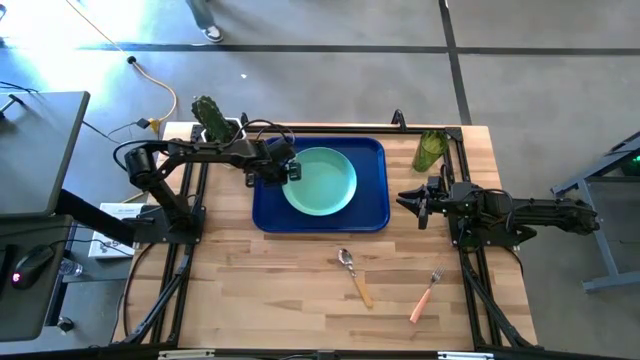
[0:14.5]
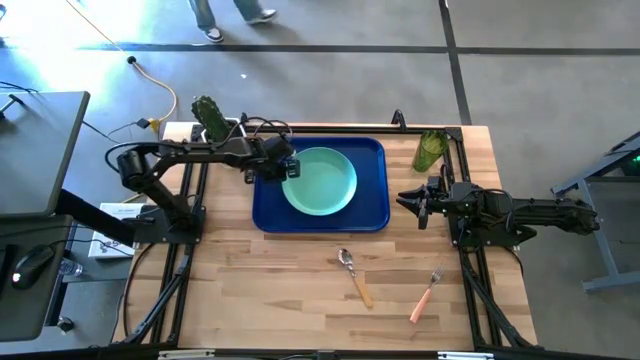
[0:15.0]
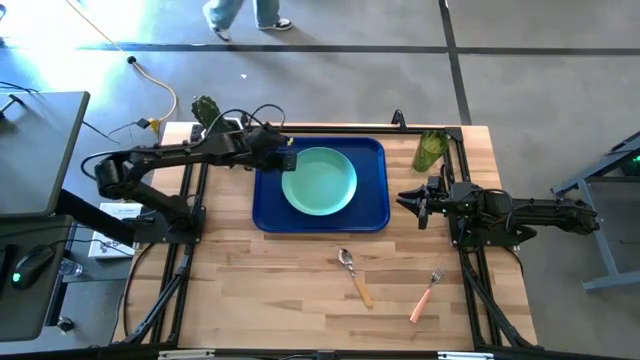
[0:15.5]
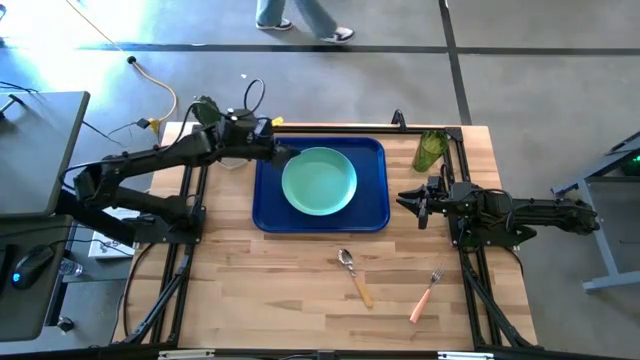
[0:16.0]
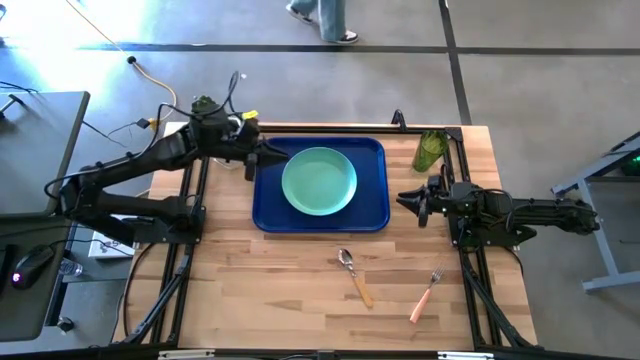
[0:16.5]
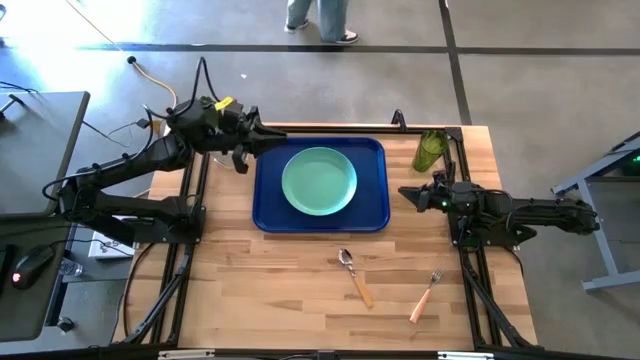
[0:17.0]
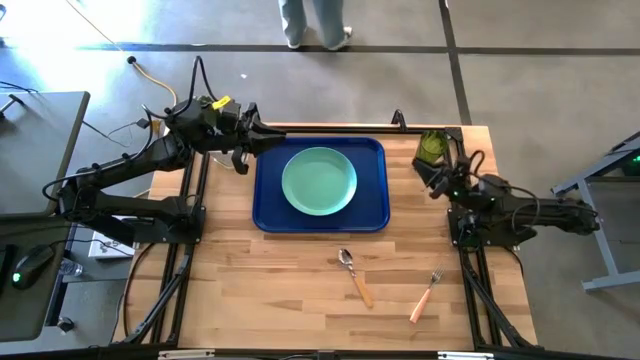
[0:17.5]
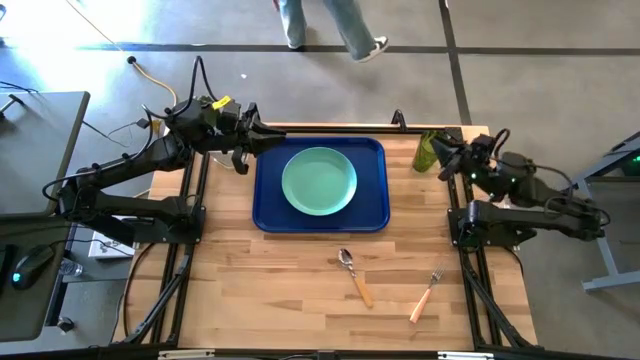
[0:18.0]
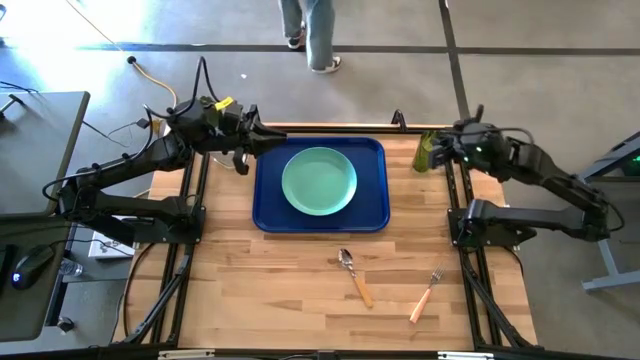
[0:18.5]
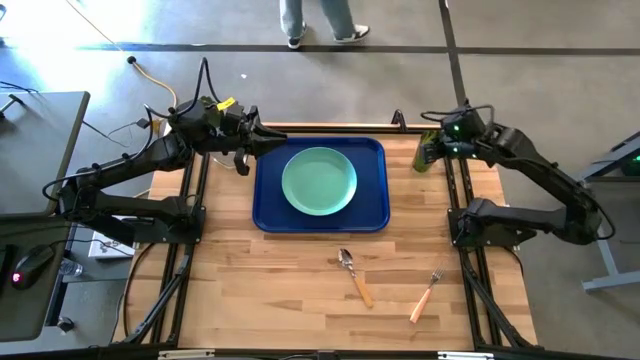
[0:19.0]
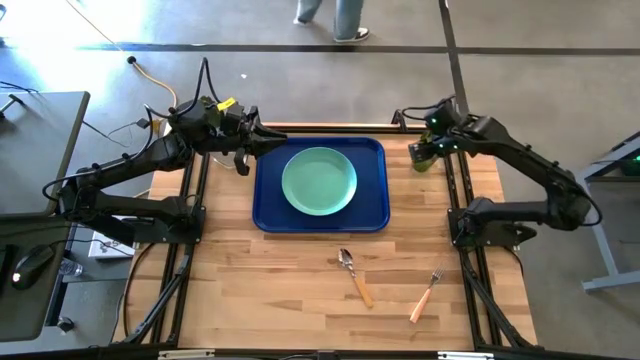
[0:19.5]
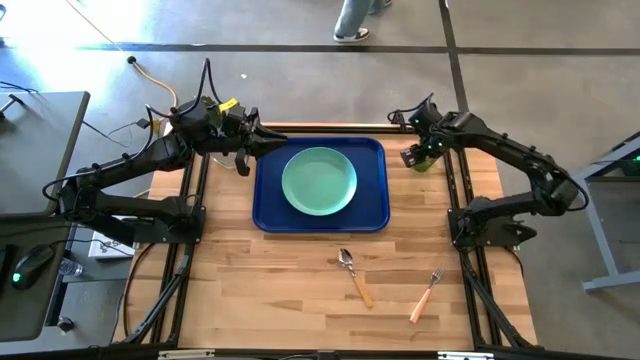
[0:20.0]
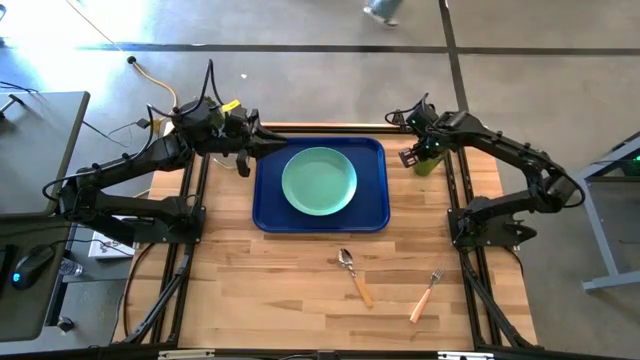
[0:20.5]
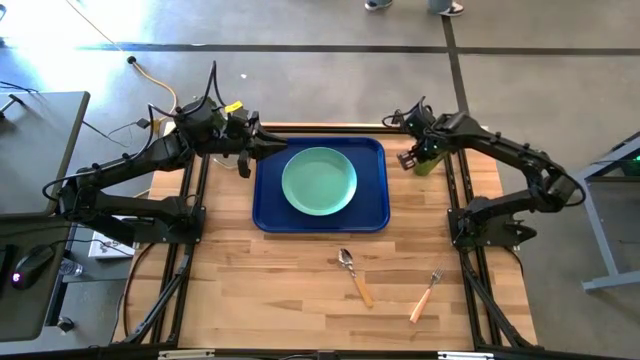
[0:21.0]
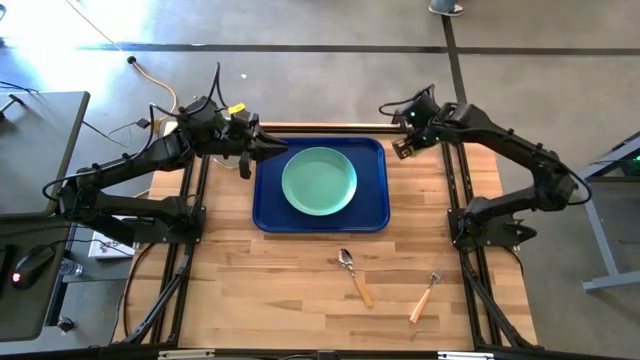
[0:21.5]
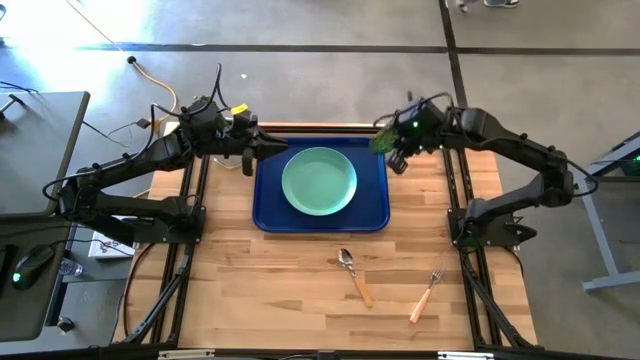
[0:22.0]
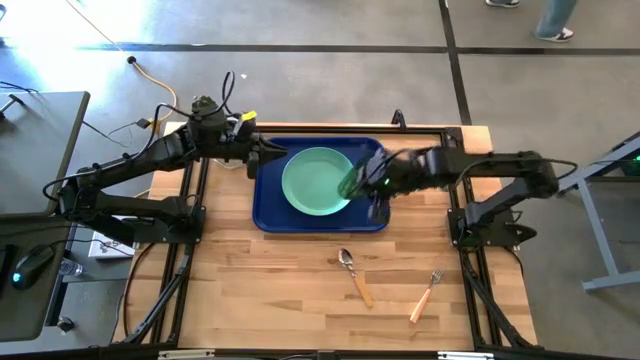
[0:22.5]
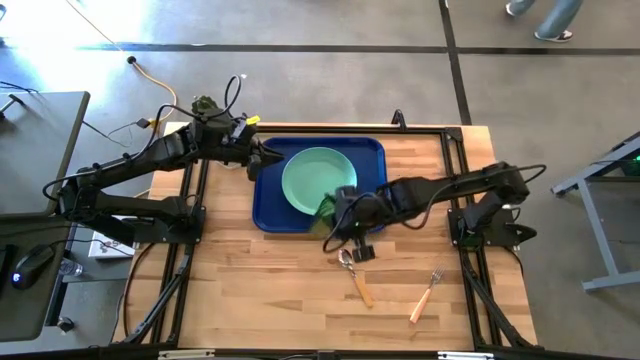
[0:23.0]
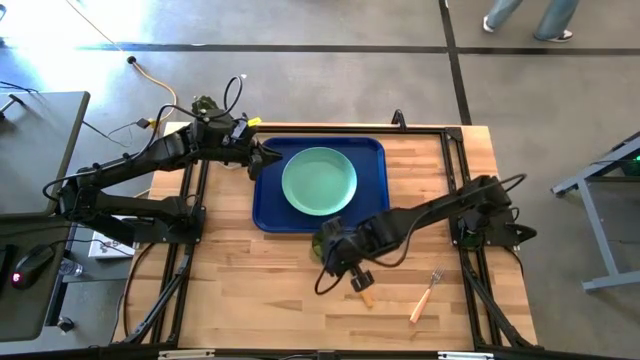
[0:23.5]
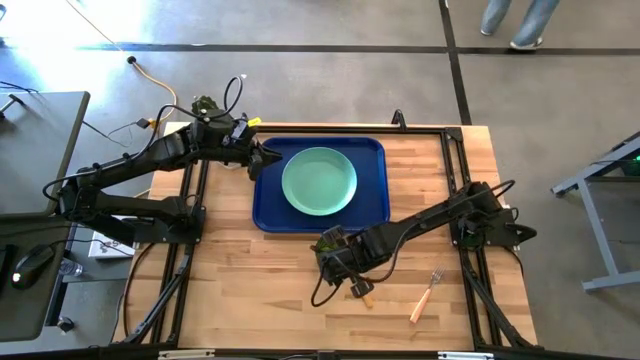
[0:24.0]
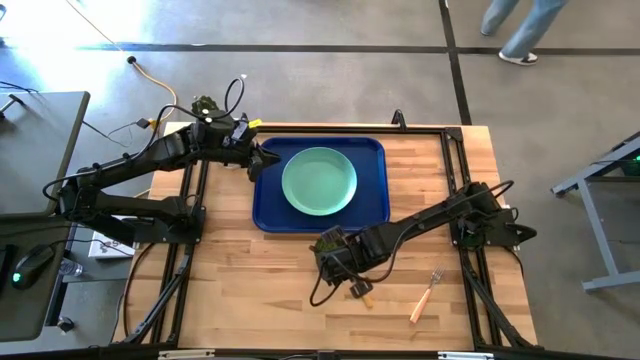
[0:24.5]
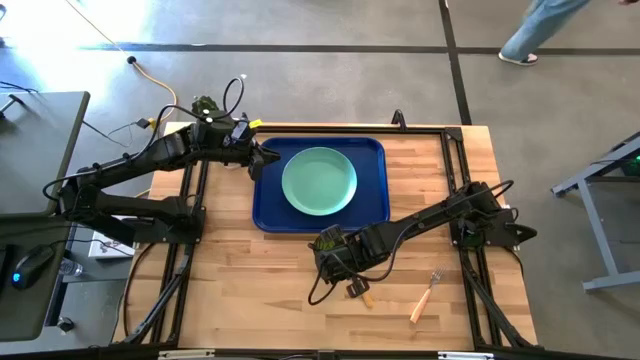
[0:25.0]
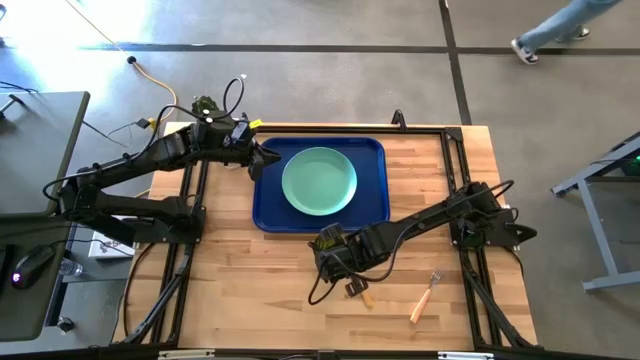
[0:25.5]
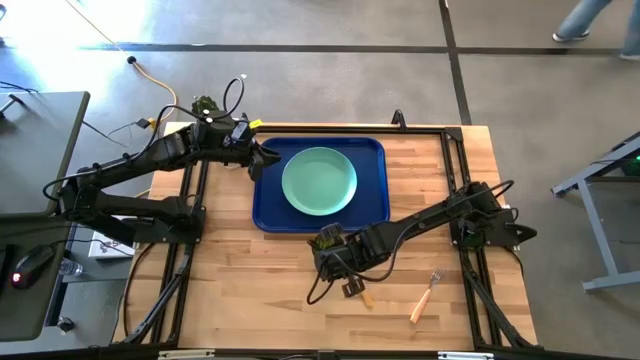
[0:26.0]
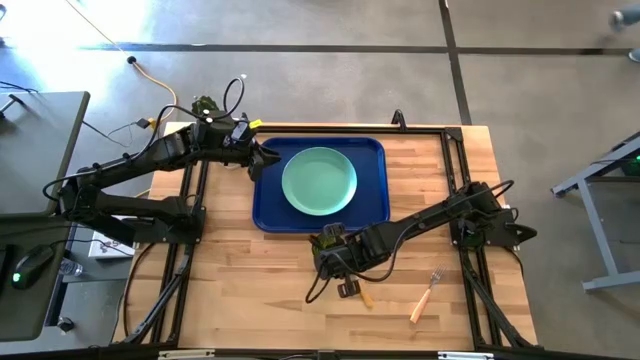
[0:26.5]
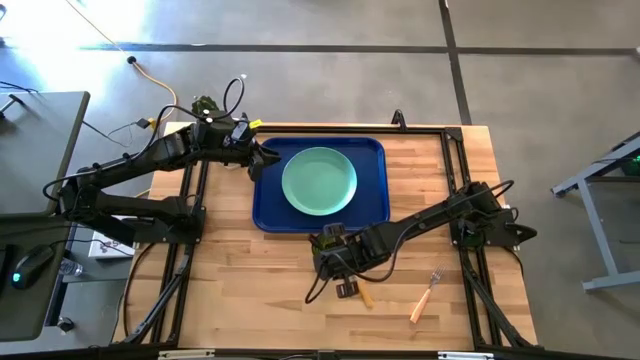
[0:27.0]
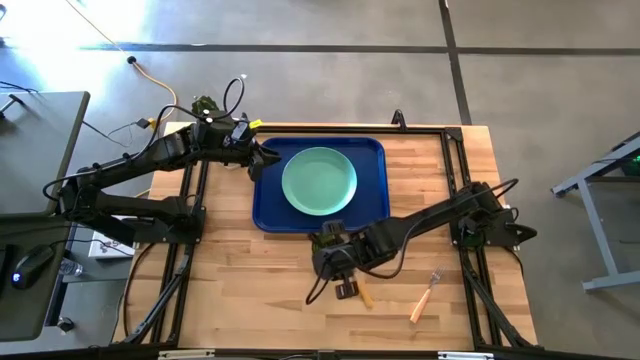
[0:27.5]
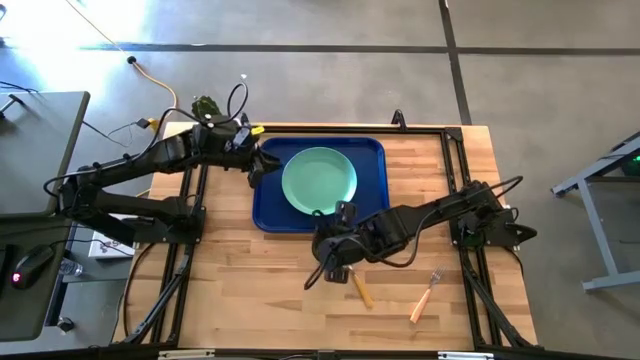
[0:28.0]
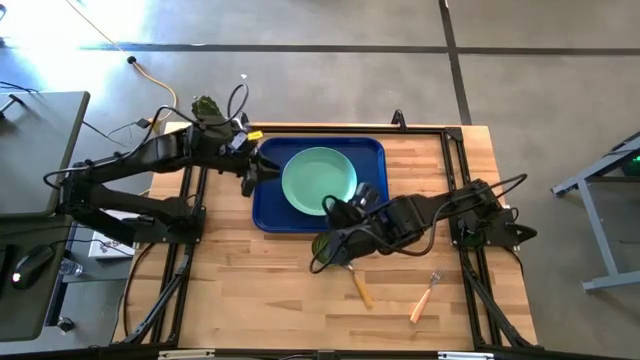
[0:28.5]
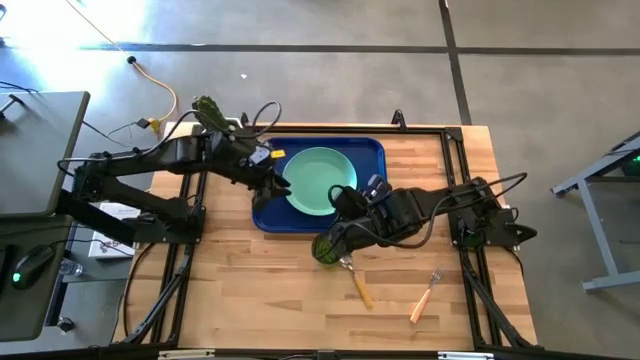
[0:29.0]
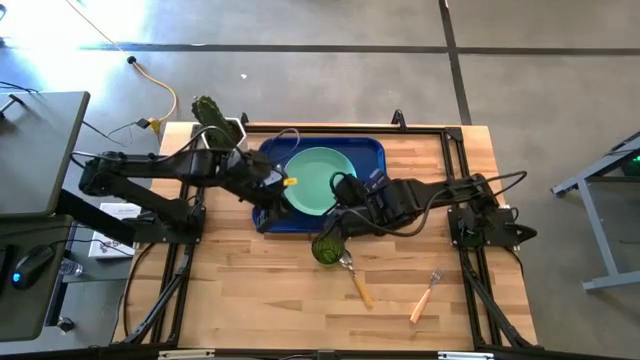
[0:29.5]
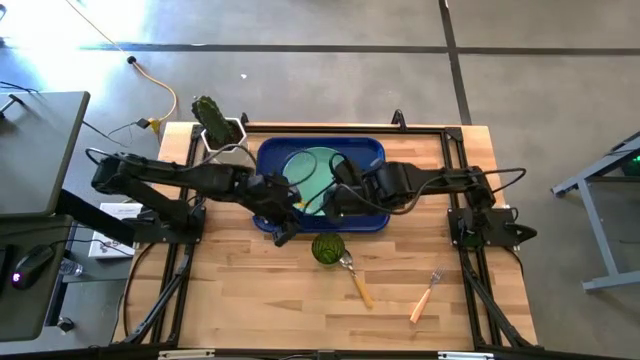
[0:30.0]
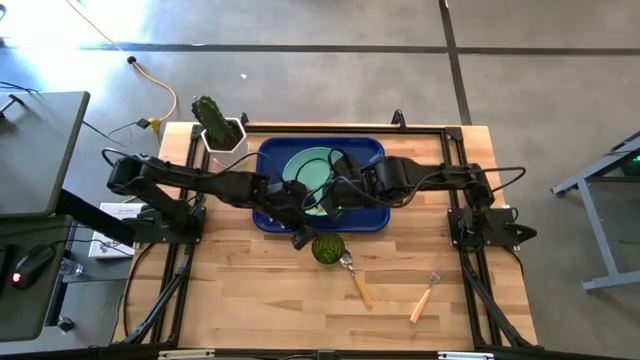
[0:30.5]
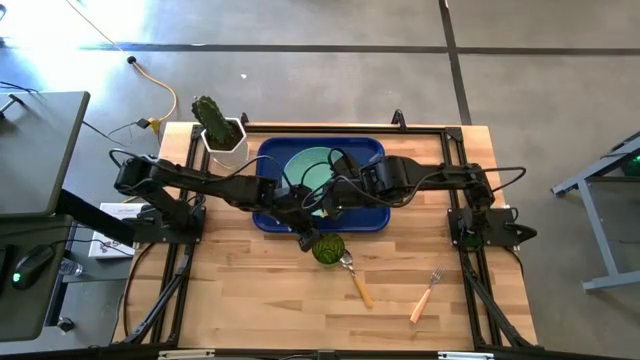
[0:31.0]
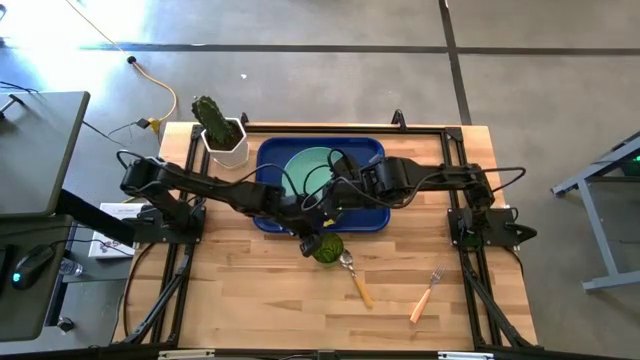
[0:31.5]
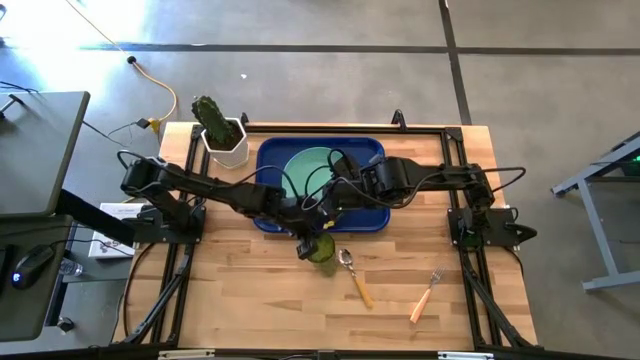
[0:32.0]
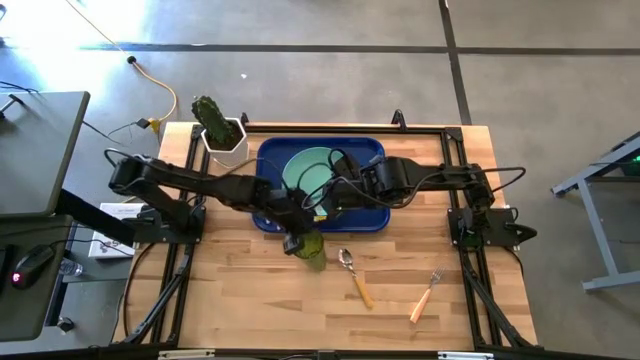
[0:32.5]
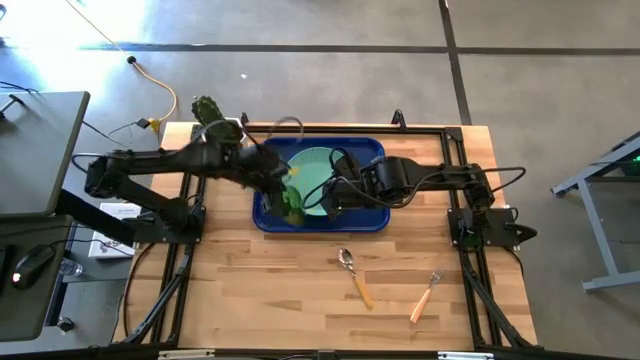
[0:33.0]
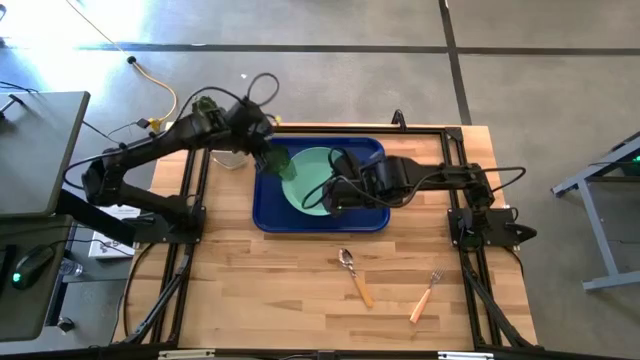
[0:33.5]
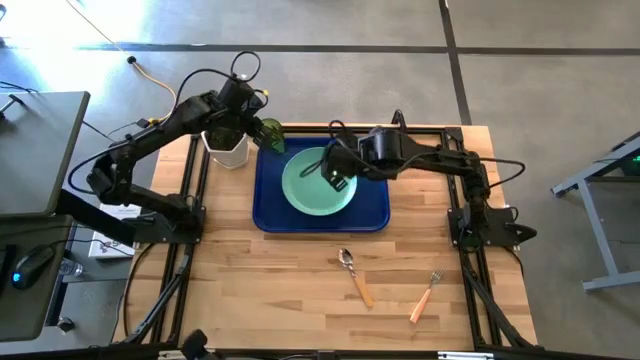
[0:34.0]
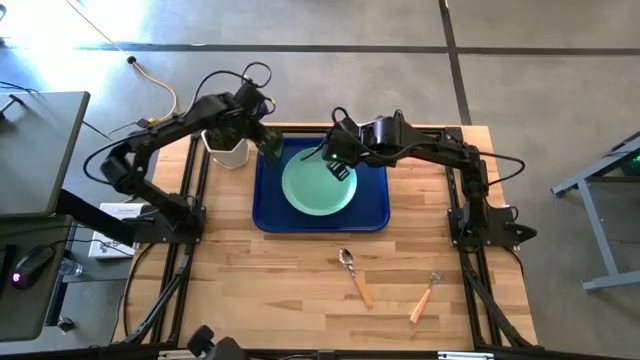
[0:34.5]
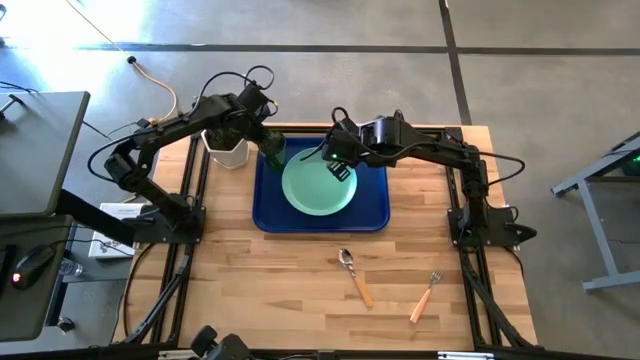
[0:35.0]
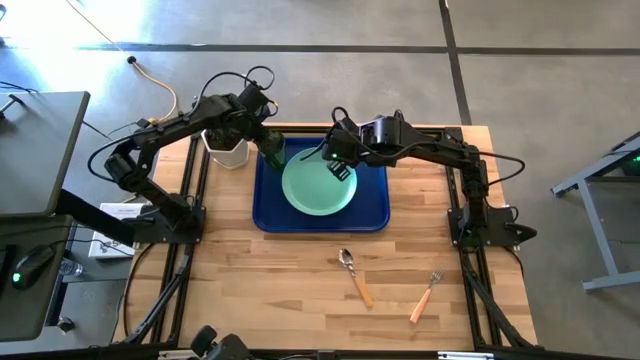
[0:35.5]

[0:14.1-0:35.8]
Task: Pick and place plate/cup/fork/spoon on tray
Put the green cup on the top left of the blue tray
